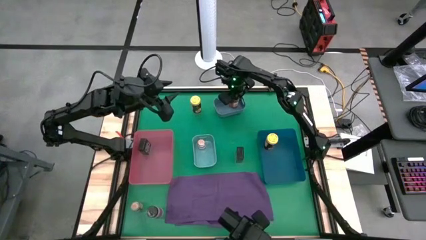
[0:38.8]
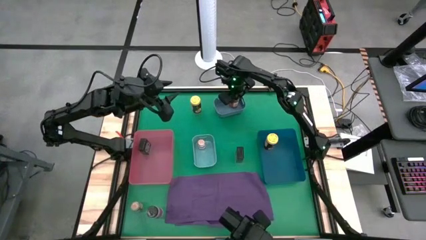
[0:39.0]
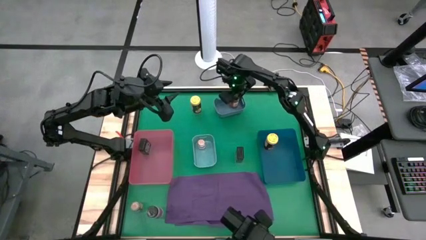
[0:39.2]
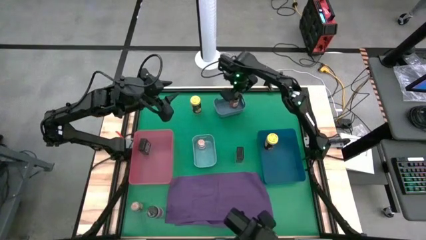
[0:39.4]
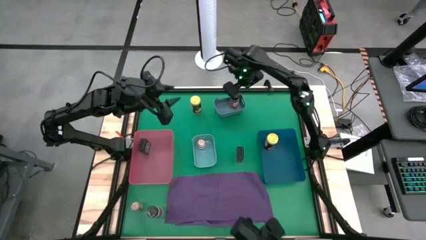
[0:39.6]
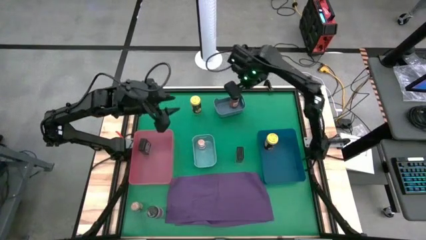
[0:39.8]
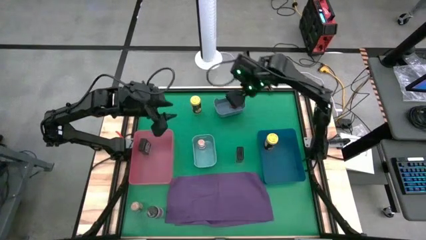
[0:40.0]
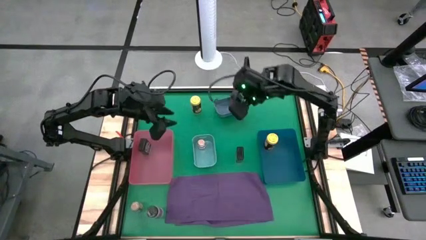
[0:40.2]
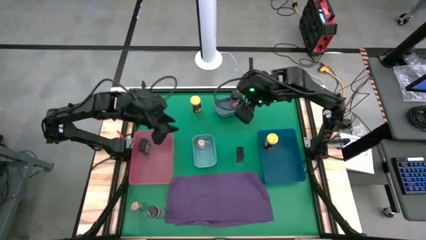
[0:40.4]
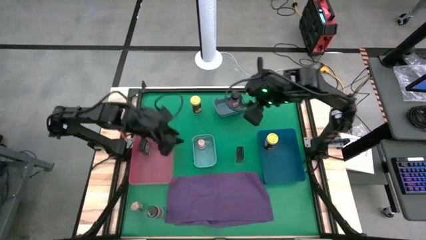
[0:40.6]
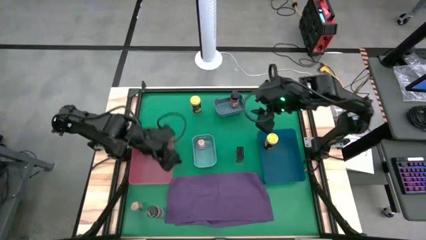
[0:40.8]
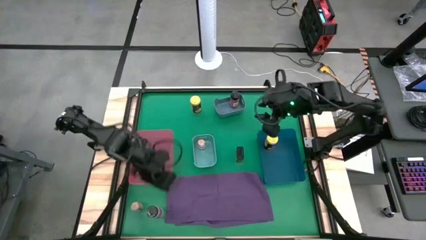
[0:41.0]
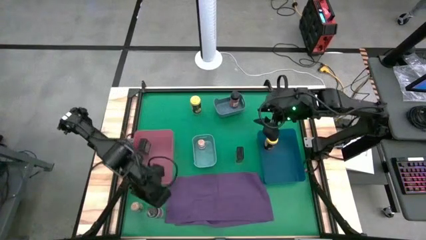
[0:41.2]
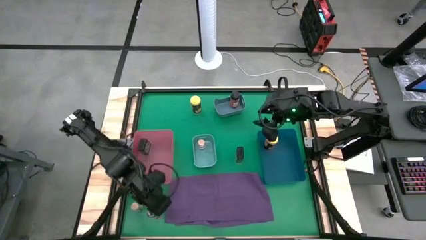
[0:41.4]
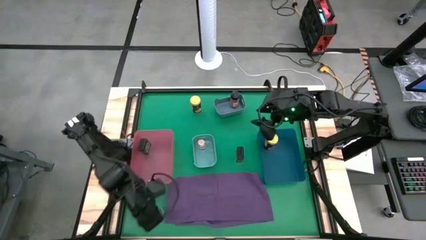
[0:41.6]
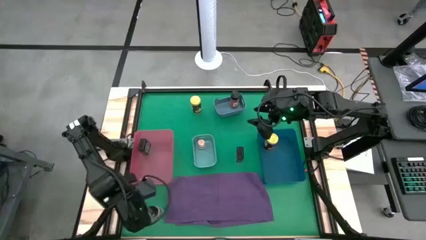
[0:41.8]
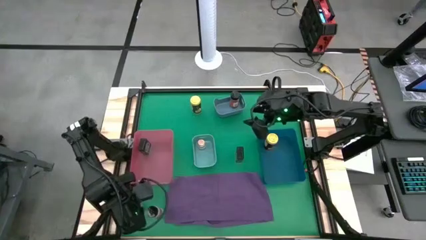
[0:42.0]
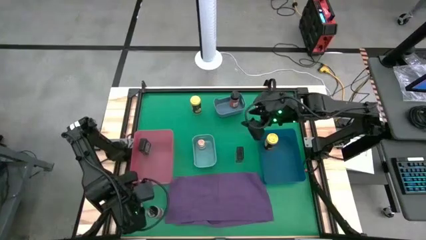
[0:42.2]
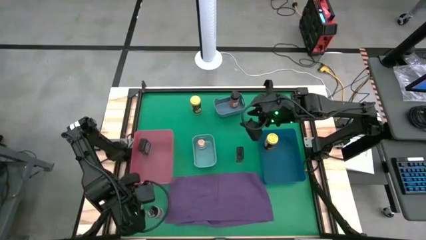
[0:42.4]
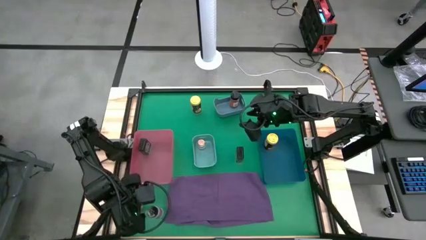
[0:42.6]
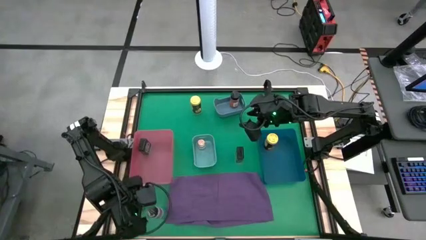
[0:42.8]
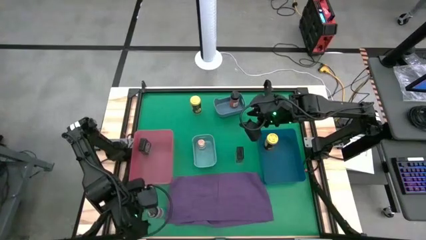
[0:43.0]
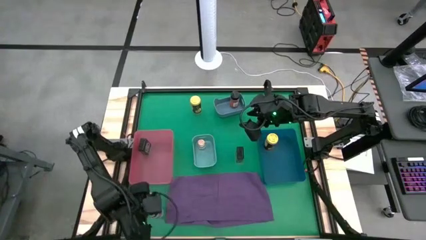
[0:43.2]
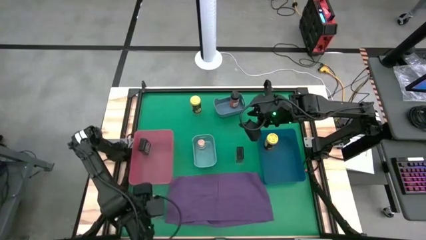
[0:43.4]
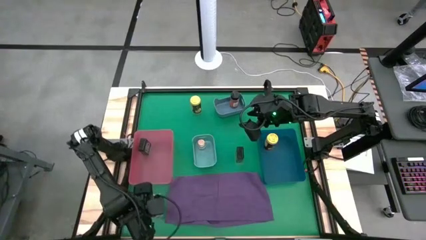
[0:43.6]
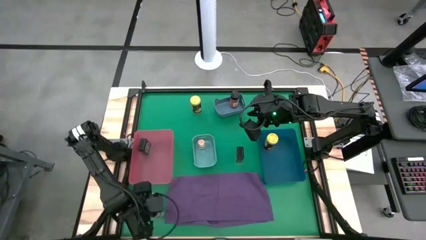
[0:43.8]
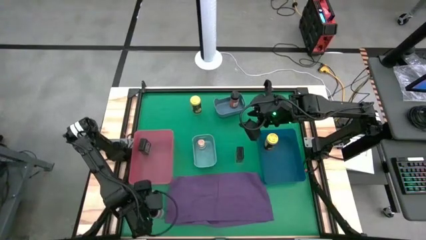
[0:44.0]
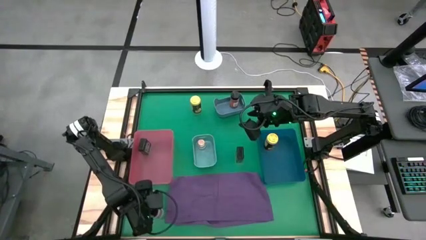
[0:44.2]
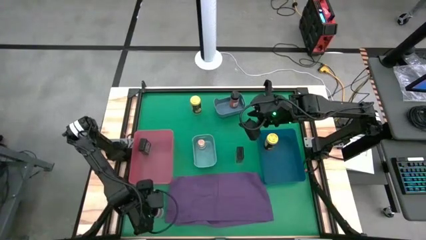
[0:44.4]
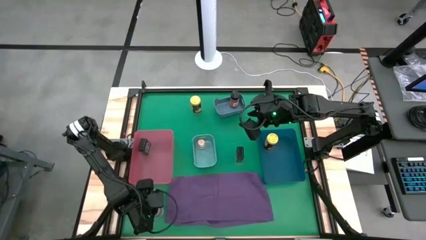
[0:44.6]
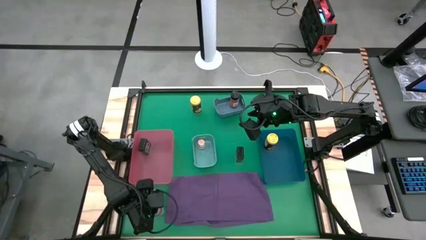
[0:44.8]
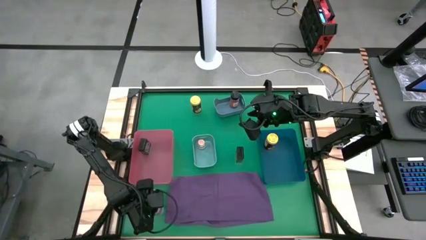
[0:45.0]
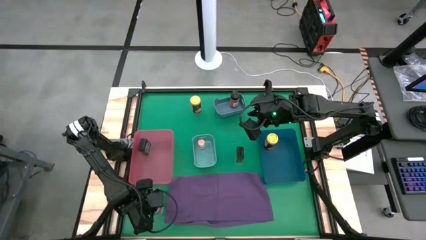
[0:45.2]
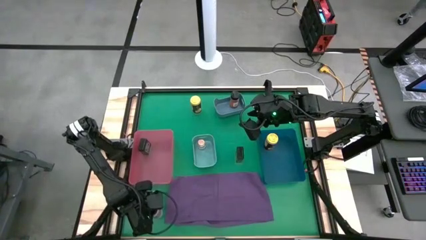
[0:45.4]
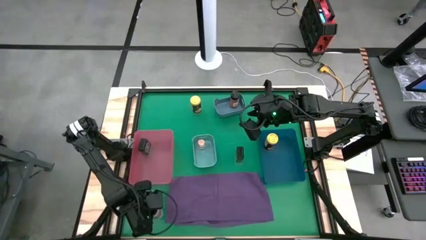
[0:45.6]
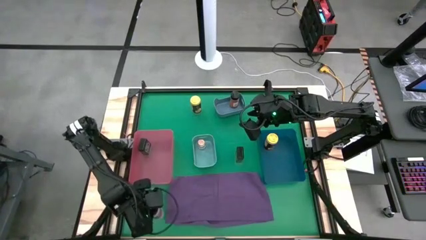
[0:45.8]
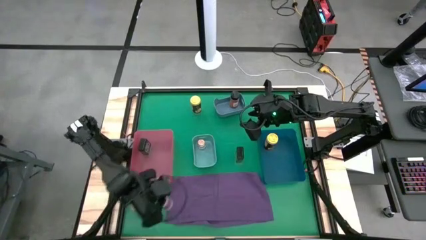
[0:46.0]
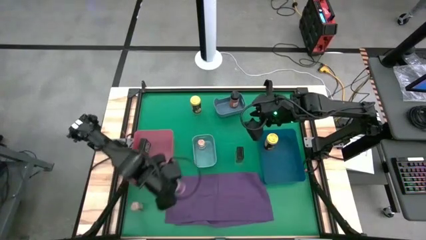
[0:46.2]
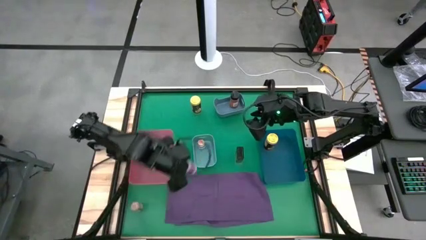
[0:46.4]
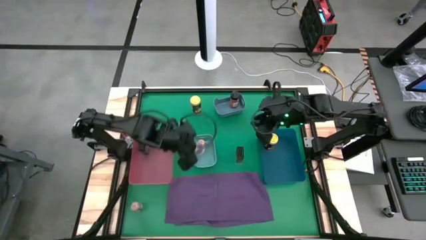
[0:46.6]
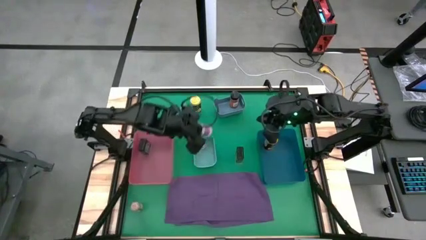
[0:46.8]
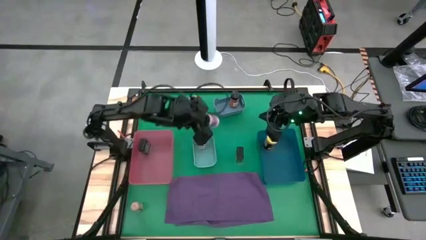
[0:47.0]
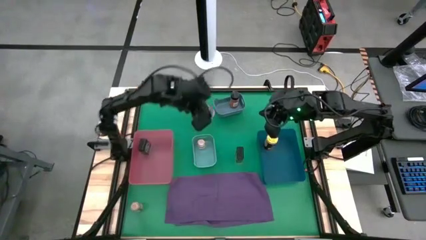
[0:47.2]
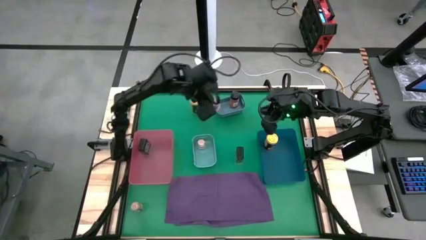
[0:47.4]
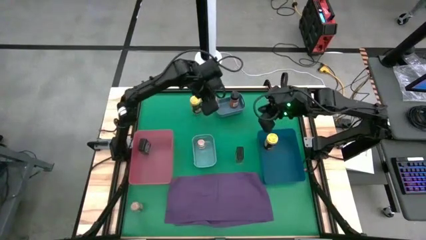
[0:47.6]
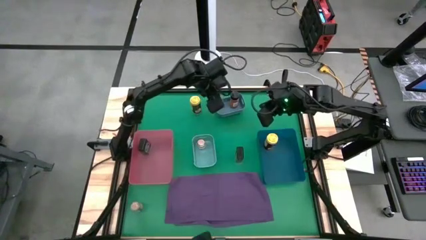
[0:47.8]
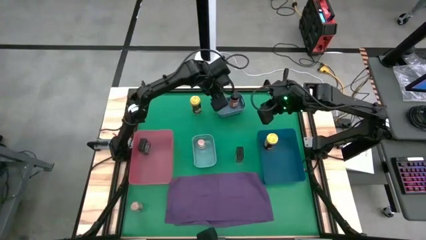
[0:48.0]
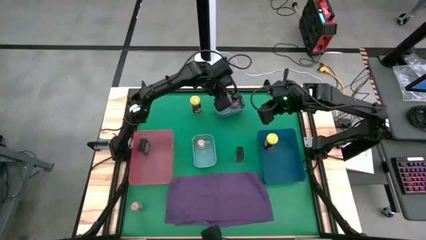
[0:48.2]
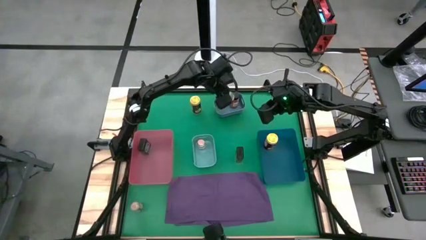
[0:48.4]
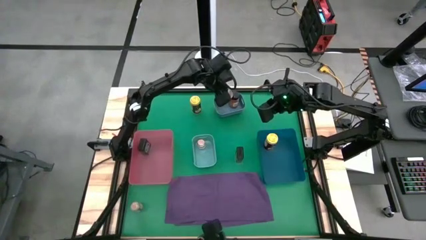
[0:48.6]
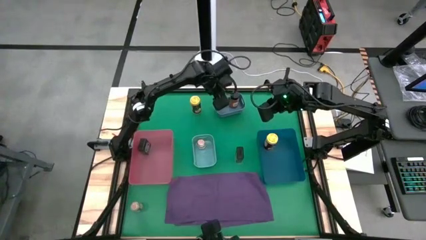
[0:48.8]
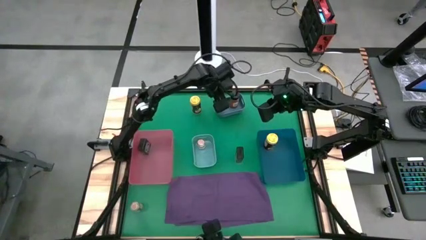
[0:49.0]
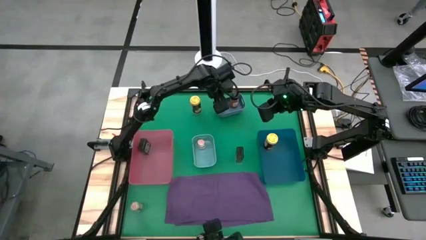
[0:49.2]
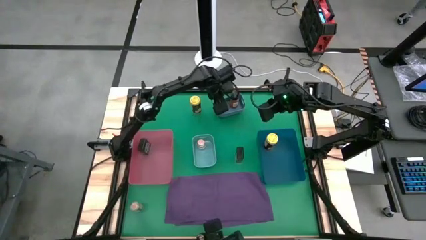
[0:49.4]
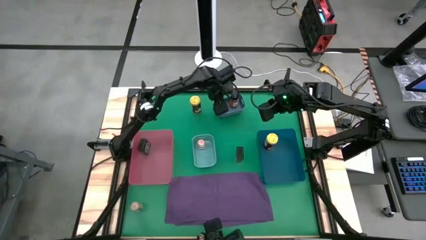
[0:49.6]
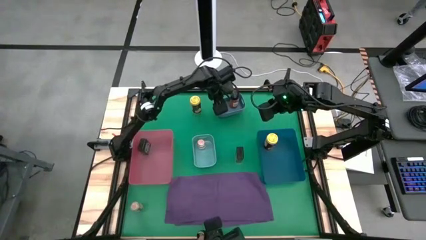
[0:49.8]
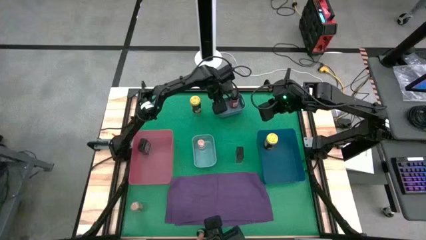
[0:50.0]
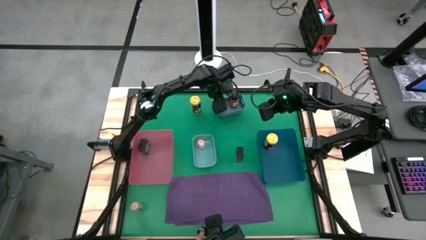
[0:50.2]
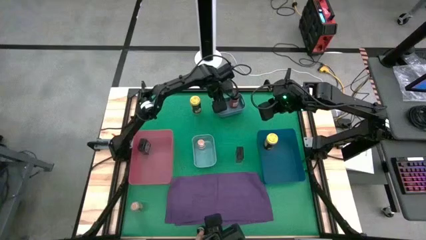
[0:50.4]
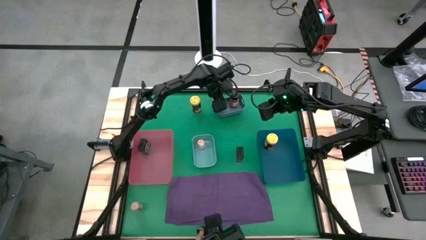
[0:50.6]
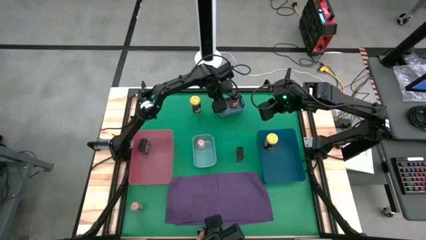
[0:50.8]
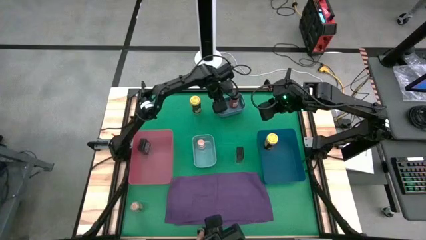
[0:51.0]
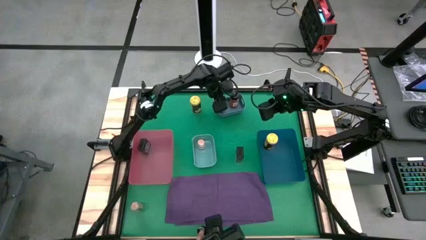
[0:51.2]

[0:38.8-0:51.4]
Task: Sort spices by type
Put the black seasoning bottle into the gray bin

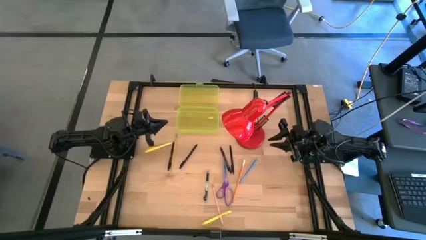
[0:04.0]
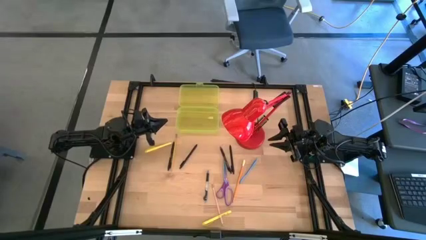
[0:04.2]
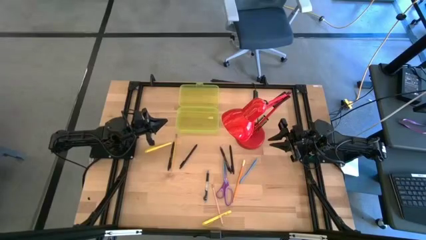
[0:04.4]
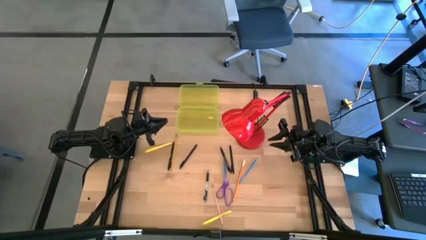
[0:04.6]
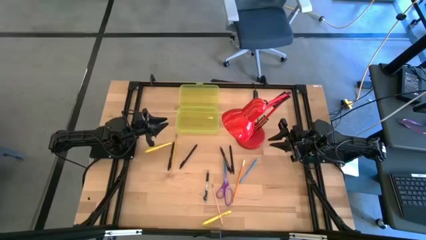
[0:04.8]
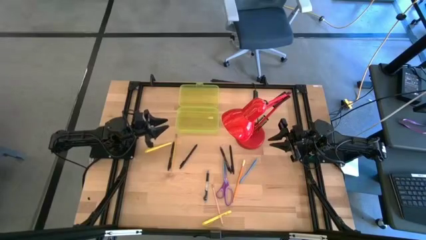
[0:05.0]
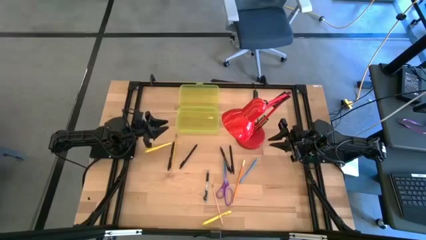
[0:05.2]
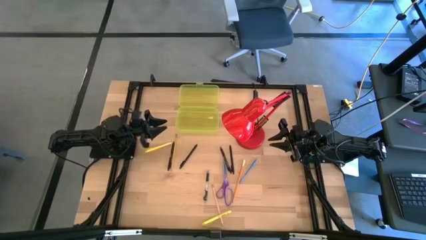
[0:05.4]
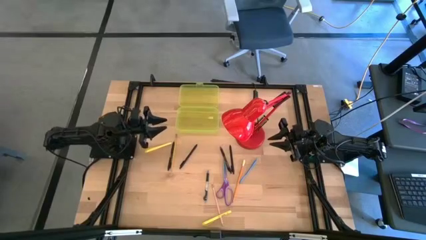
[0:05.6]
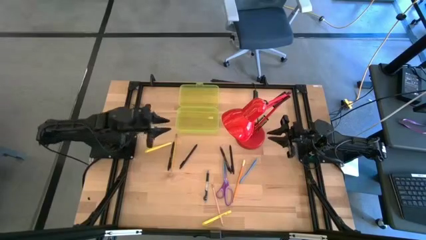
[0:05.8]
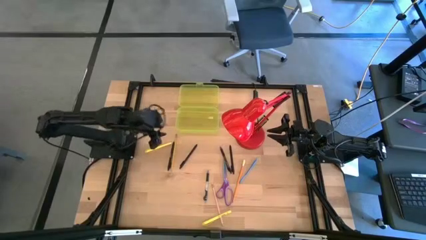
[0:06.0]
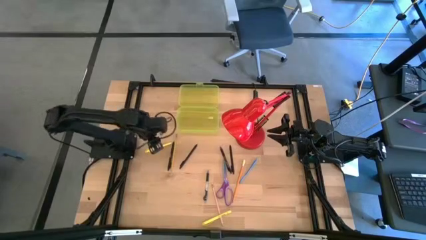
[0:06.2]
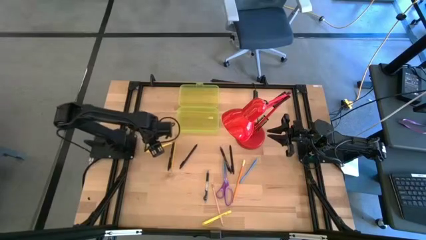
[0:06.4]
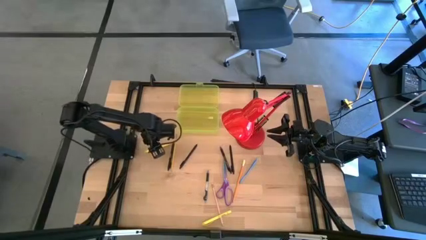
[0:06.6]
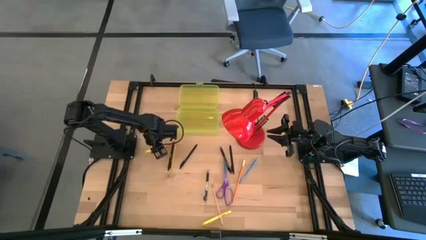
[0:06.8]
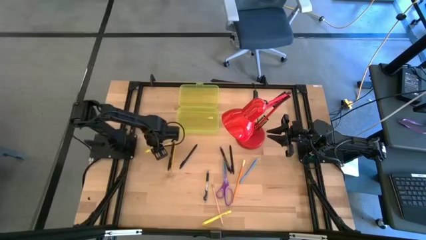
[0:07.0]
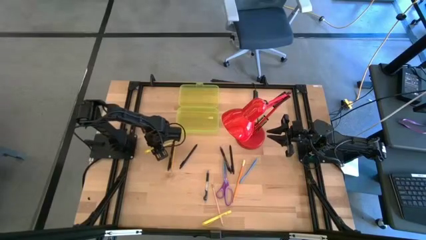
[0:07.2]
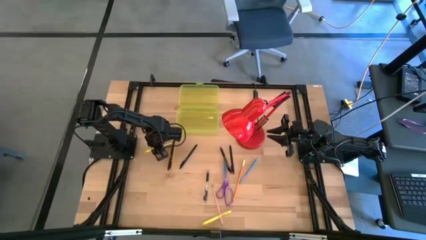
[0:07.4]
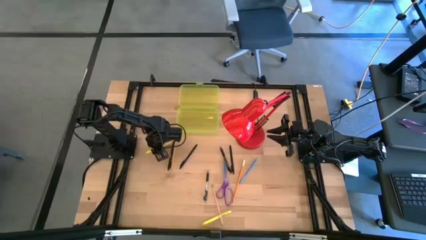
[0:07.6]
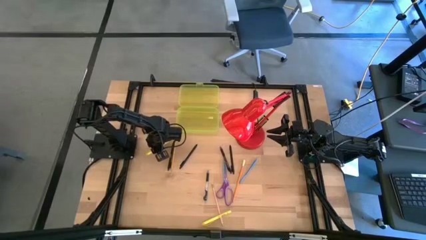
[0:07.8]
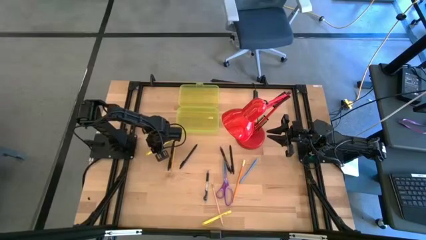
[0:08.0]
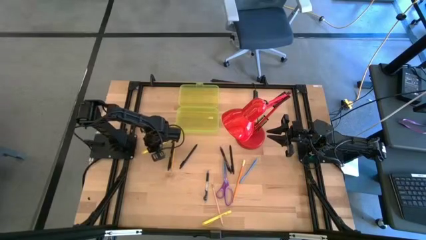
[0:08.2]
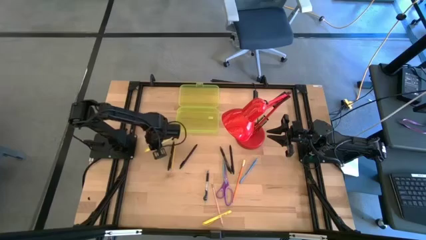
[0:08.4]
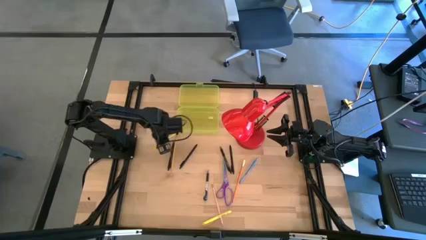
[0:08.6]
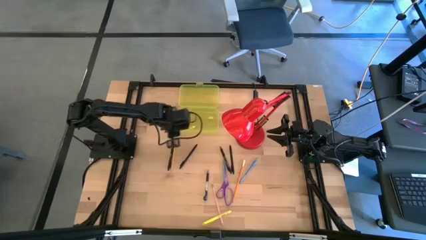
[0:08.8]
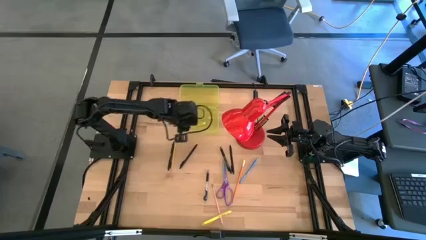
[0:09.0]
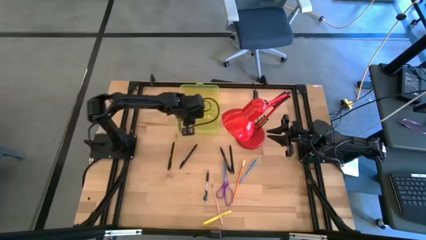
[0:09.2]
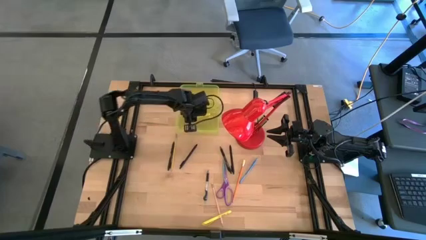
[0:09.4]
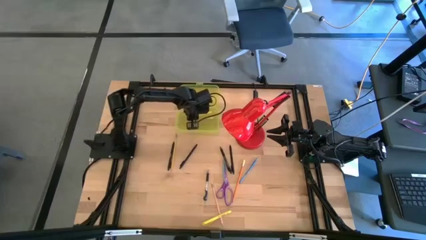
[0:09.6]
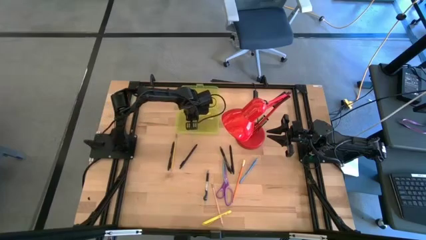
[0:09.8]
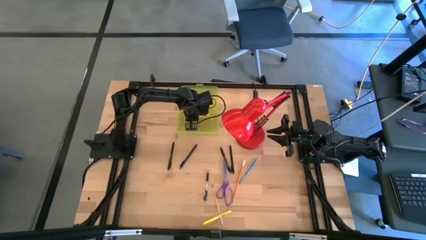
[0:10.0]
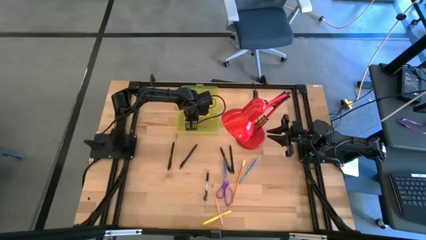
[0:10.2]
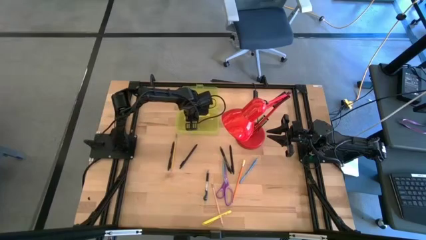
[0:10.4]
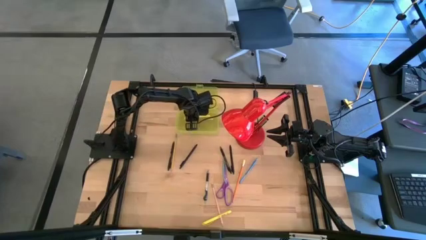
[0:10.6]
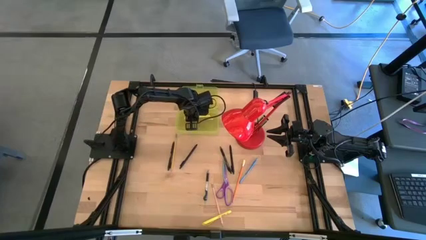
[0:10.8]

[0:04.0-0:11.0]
Task: Pick & place school supplies into a supply box
Put the top yellow pen into the yellow supply box
